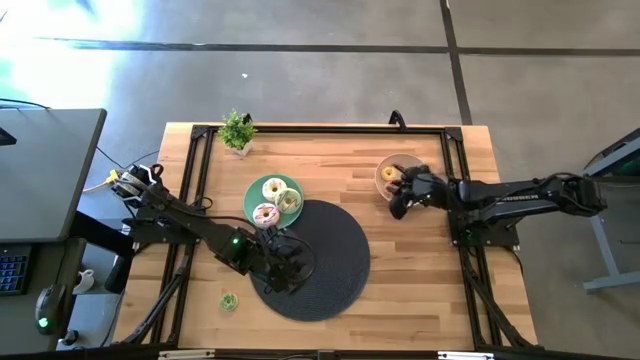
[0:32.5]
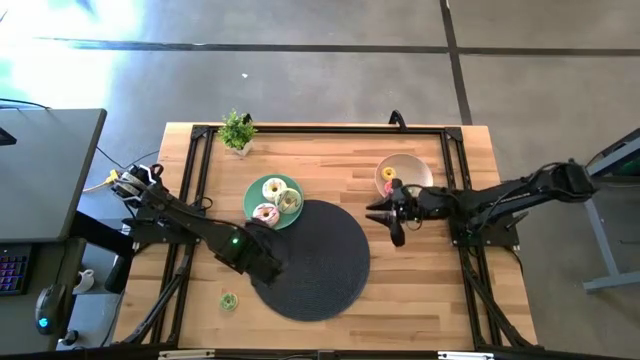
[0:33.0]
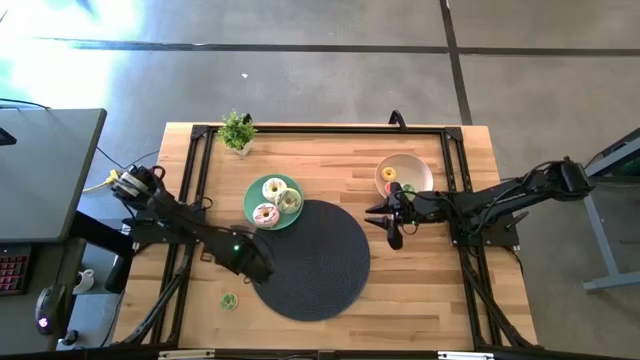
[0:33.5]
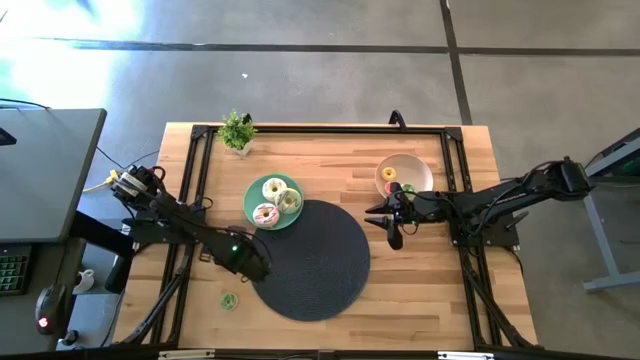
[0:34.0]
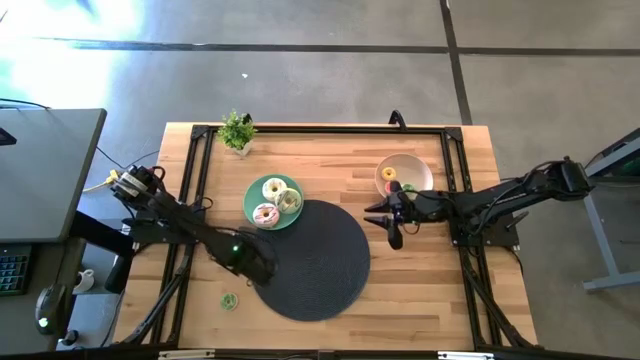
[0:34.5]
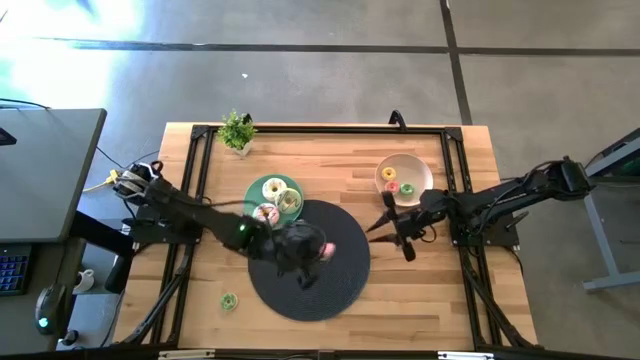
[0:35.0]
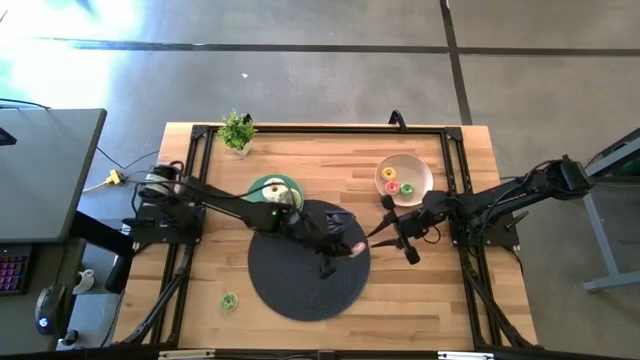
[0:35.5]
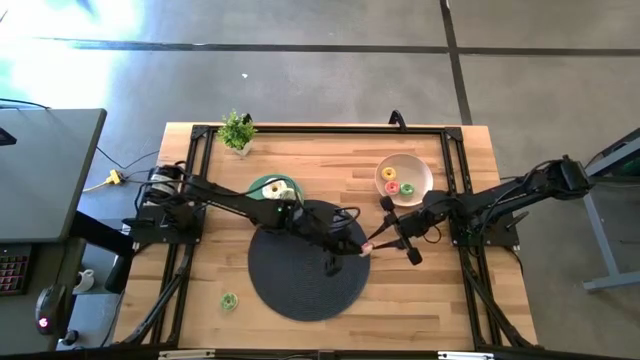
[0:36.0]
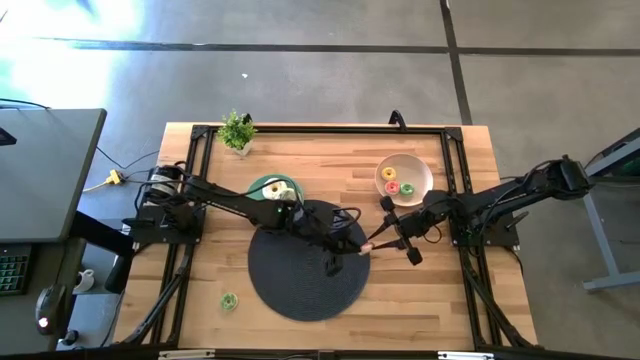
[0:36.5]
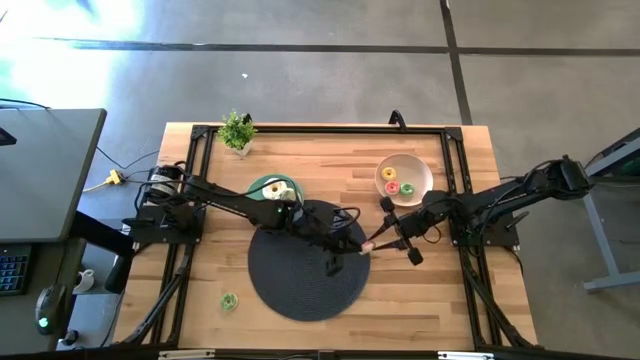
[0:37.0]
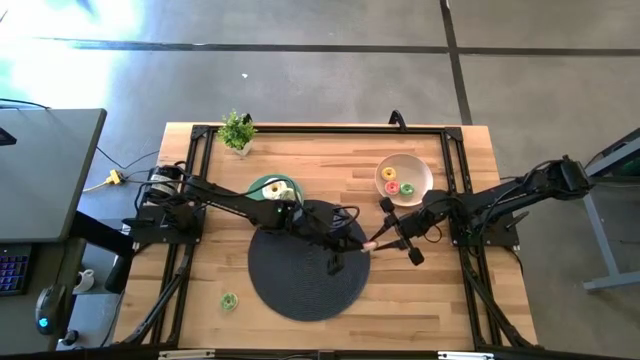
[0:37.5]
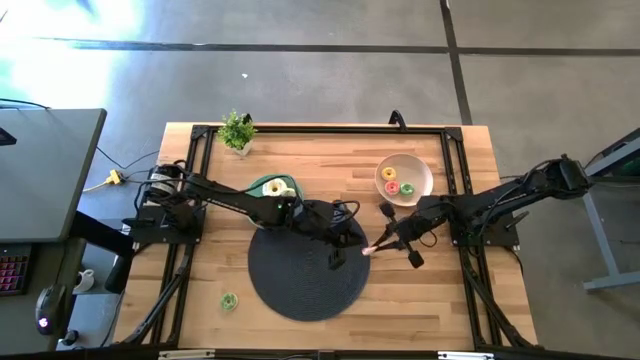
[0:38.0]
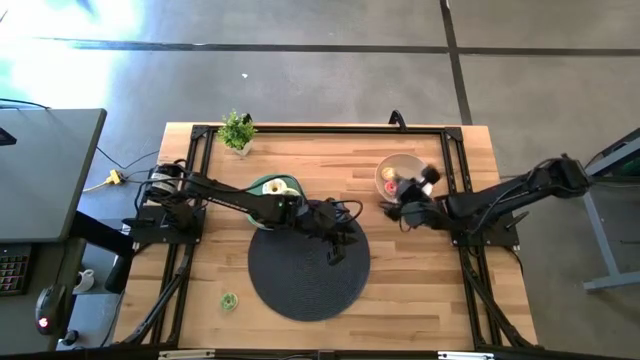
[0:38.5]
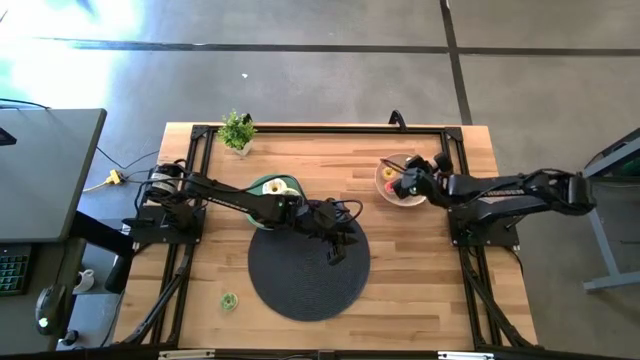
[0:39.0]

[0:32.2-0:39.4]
Task: Pick & Place donuts
Put the small pink donut on the white plate

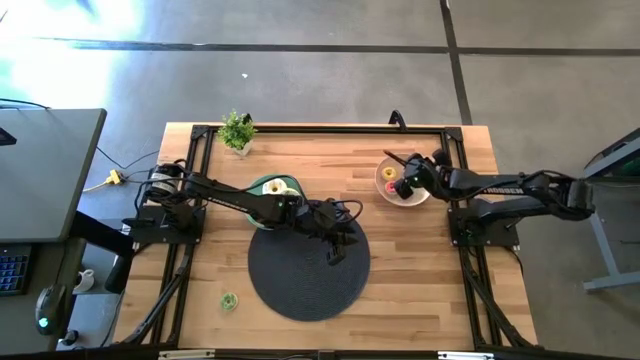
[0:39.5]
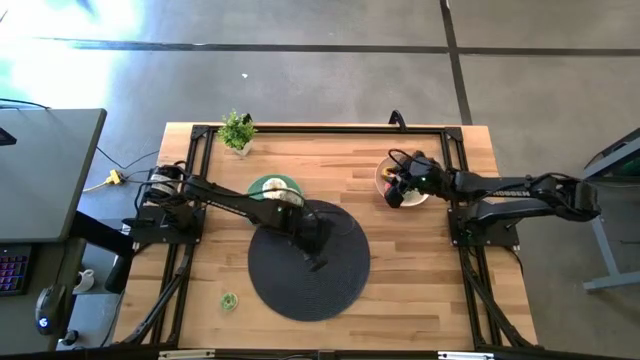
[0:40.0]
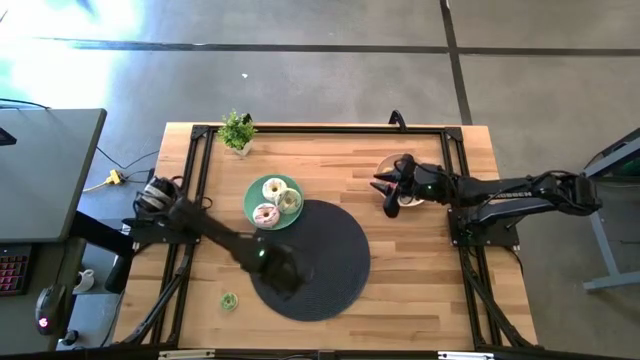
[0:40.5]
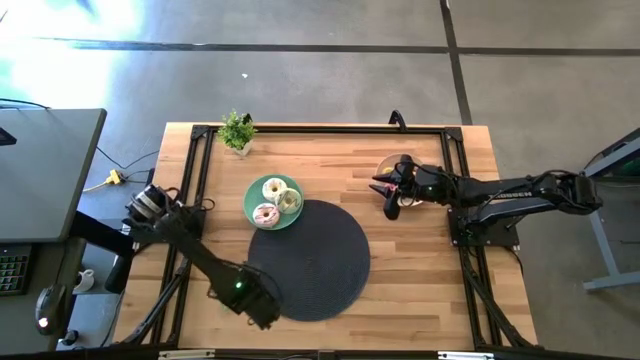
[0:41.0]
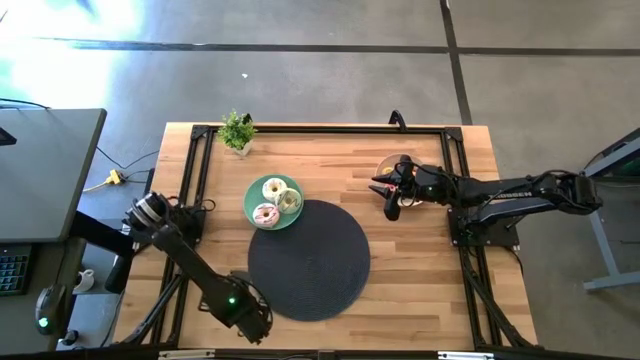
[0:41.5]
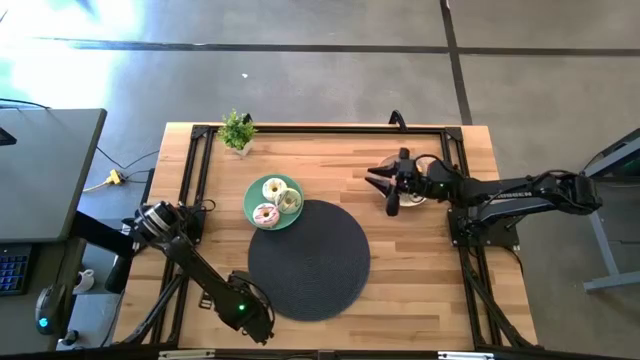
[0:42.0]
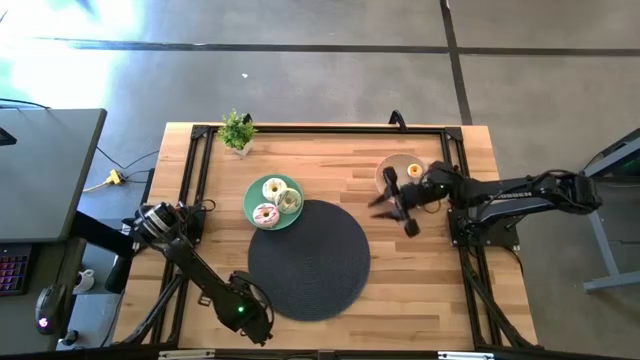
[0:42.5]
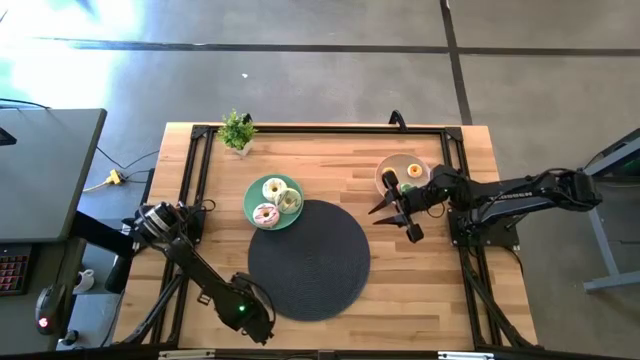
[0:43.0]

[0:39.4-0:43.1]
Put the small green donut on the white plate

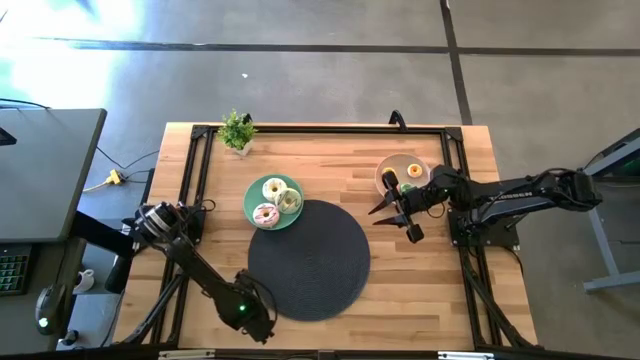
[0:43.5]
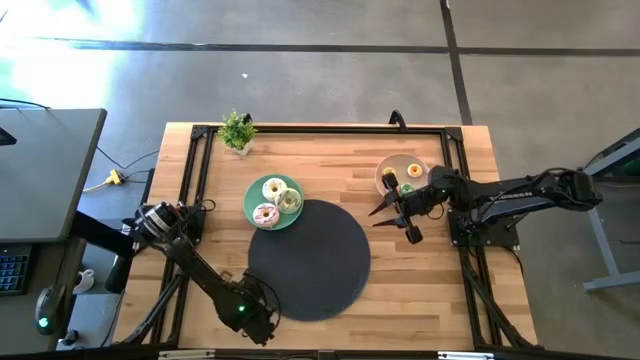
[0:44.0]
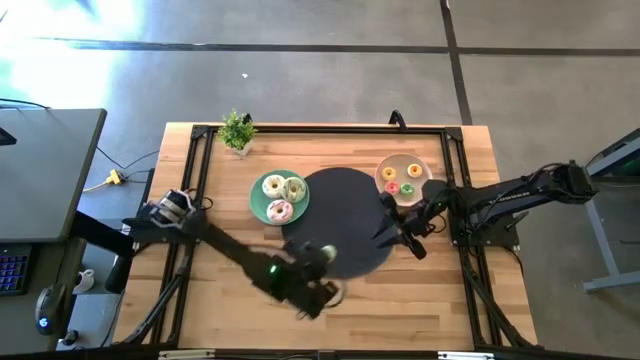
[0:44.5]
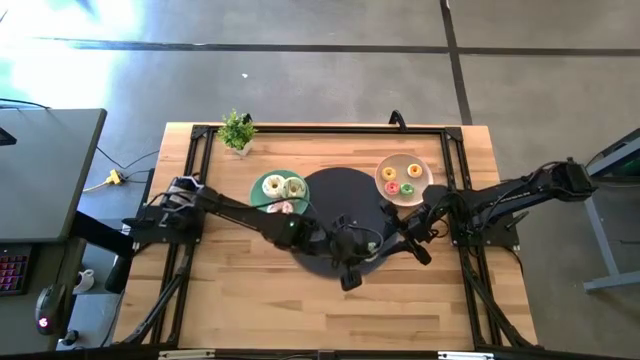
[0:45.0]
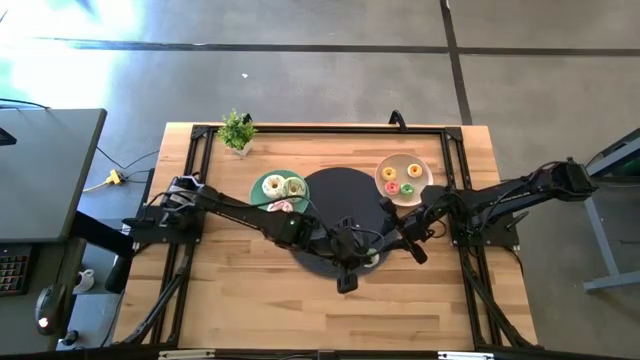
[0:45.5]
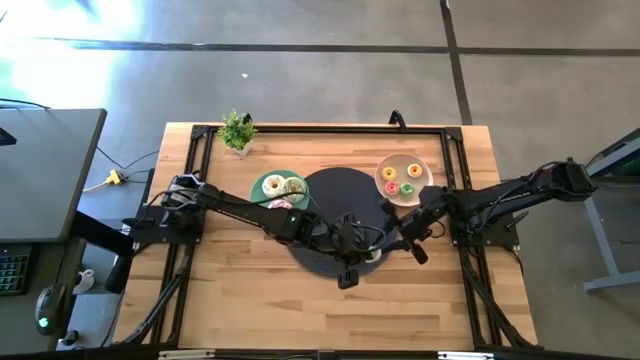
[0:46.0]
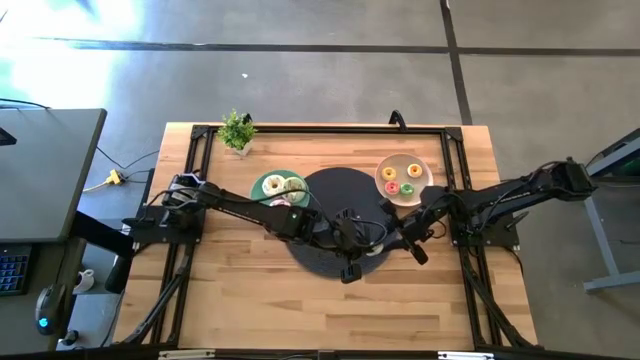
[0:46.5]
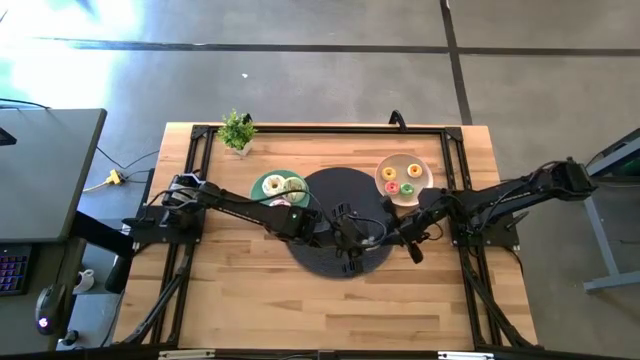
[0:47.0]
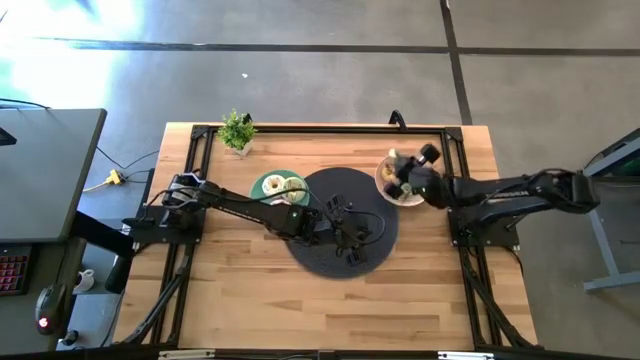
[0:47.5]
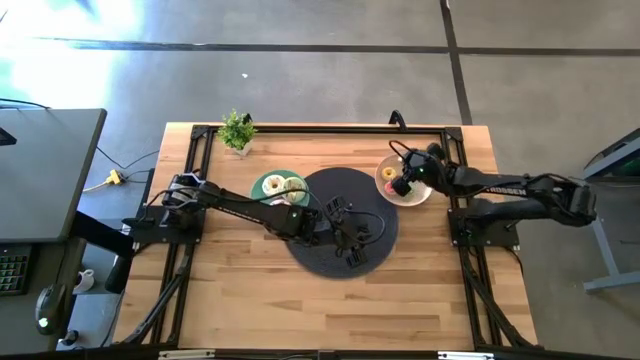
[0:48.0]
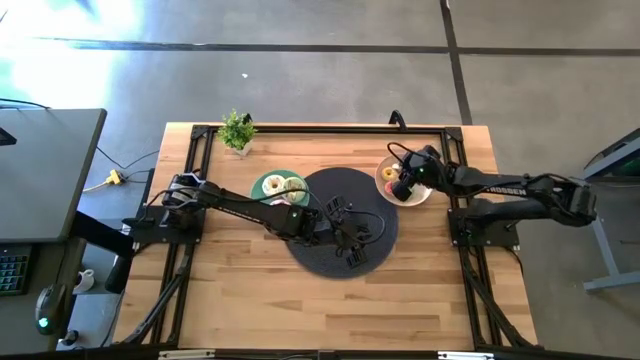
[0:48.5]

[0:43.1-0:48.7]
Put the small green donut on the white plate

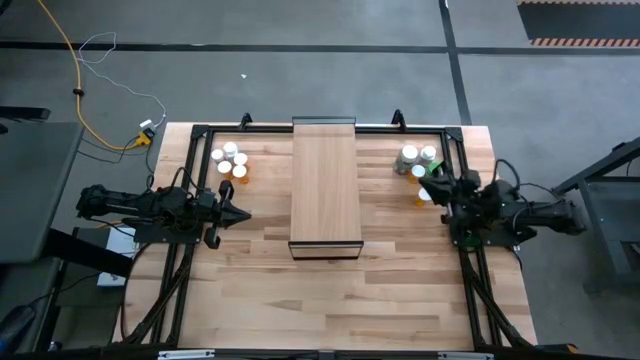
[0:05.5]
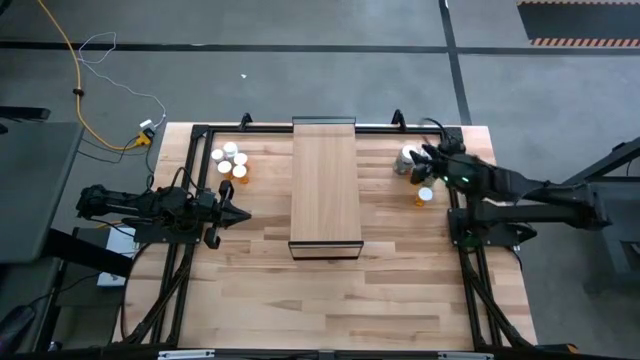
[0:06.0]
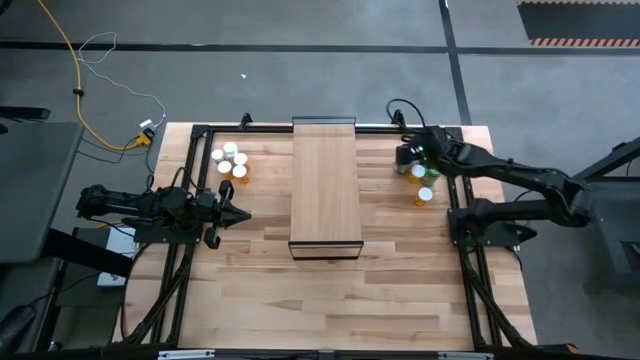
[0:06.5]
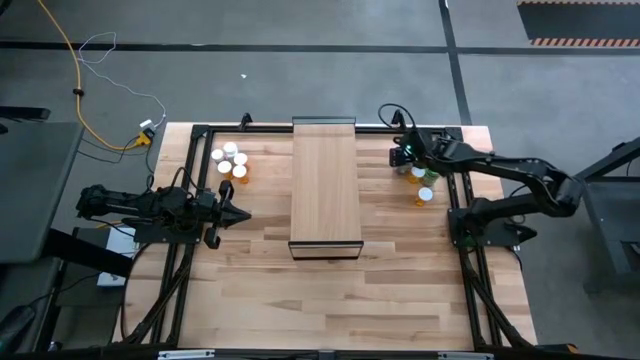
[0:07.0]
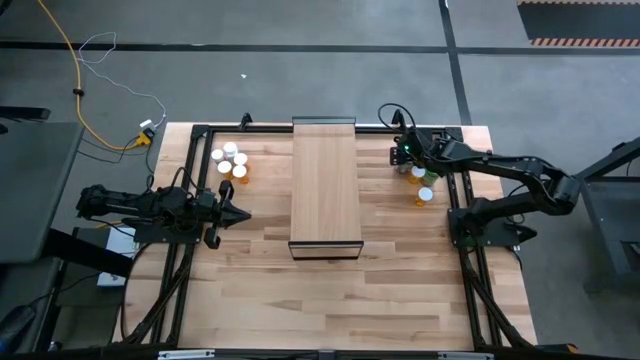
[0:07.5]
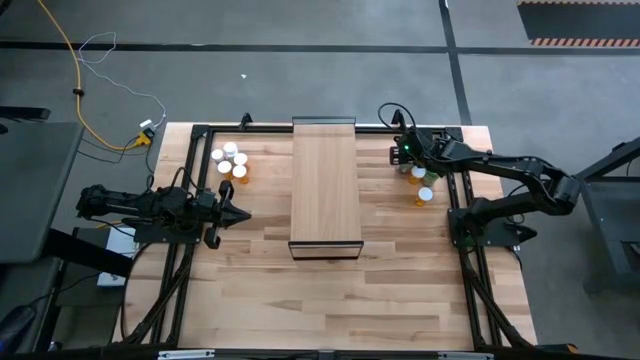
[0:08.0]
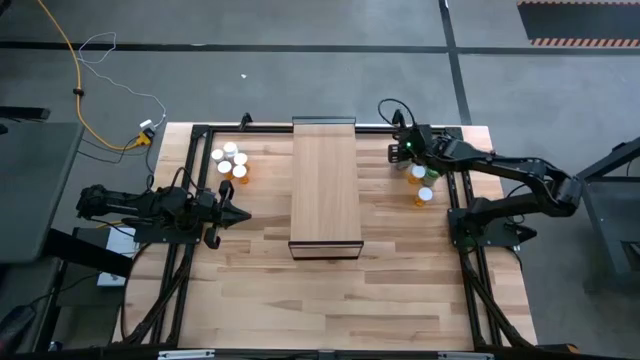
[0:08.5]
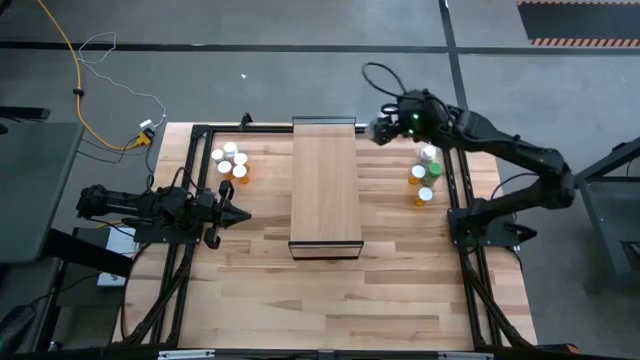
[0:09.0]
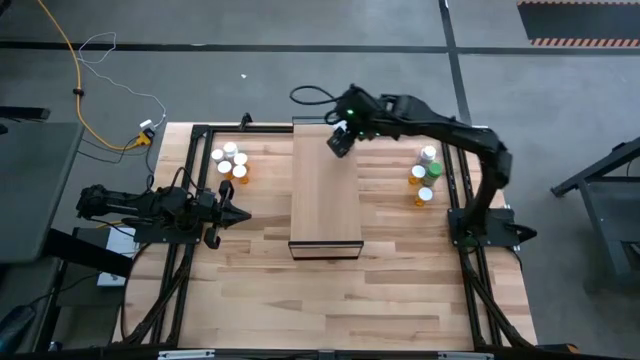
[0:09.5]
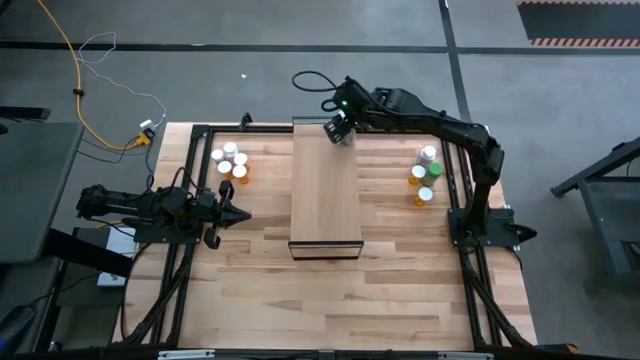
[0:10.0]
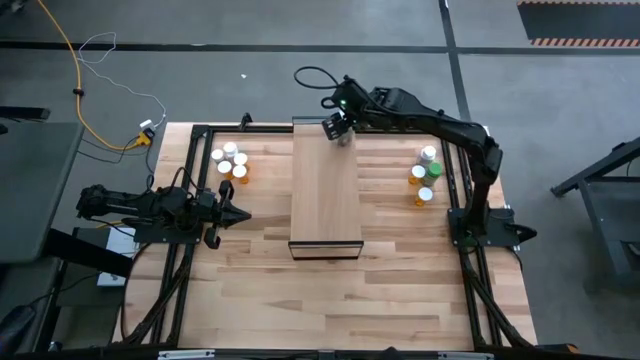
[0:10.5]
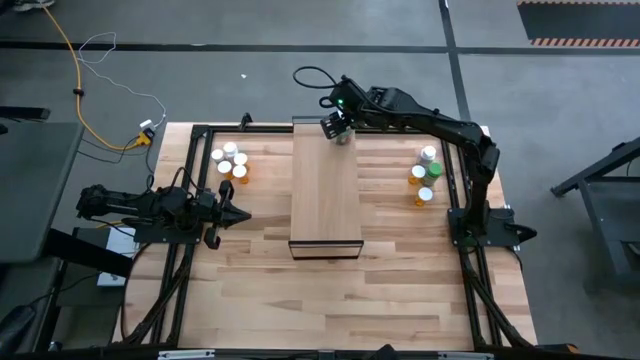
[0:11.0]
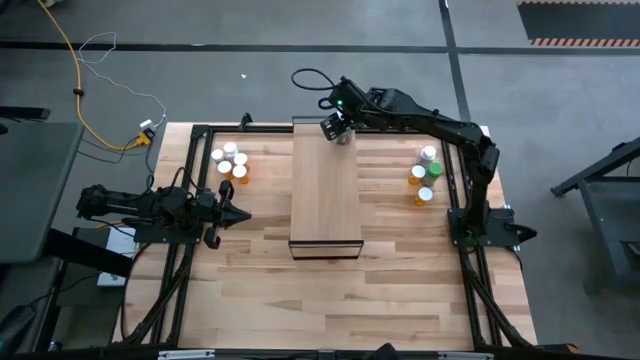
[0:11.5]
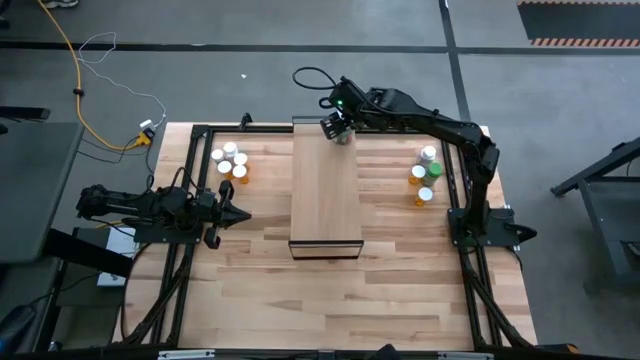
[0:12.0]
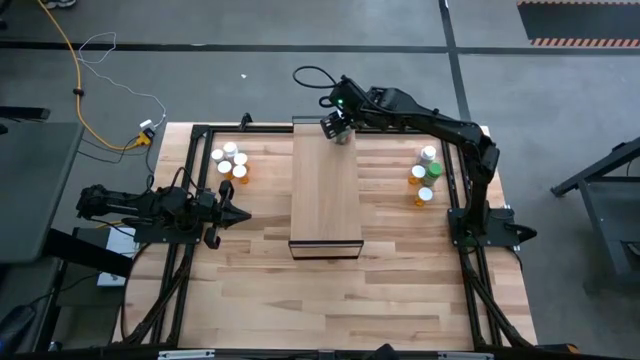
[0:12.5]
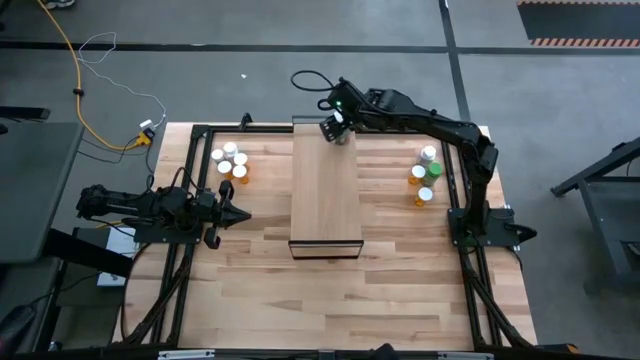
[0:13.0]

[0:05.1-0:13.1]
Task: Pick and place medicine bottles onto shelf by color
Put the transparent pill bottle on the shelf
